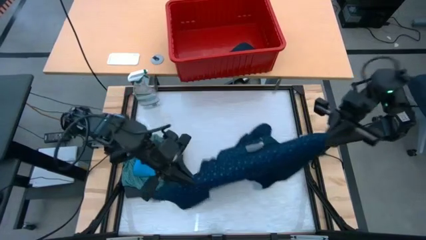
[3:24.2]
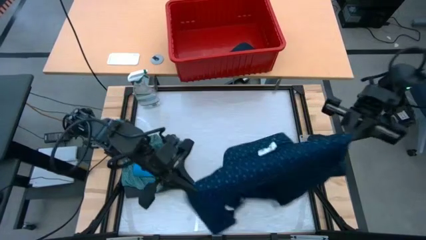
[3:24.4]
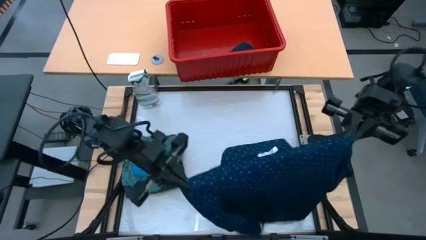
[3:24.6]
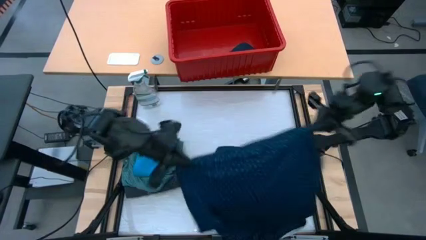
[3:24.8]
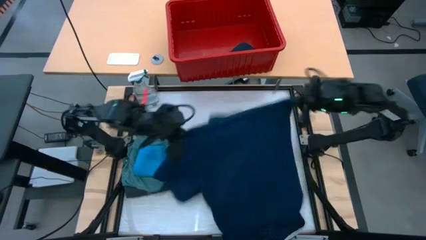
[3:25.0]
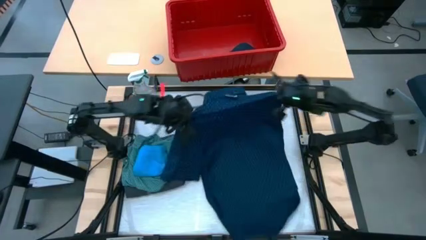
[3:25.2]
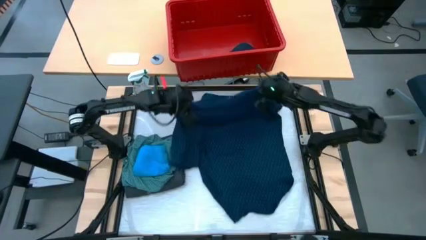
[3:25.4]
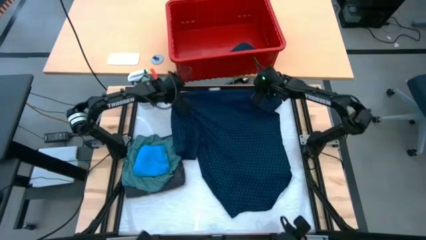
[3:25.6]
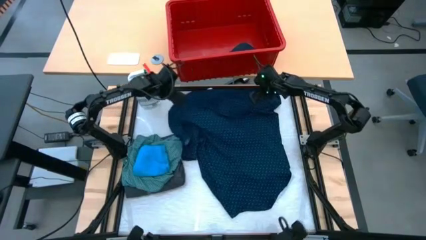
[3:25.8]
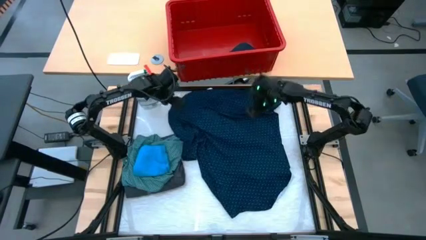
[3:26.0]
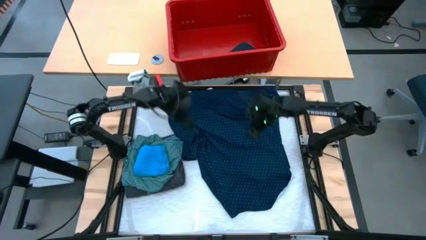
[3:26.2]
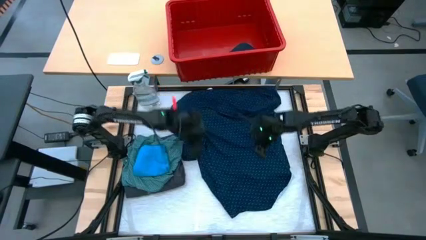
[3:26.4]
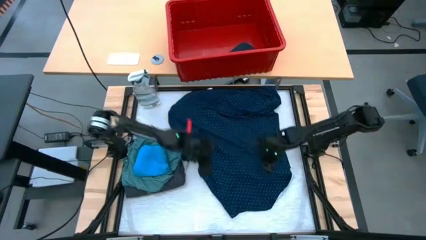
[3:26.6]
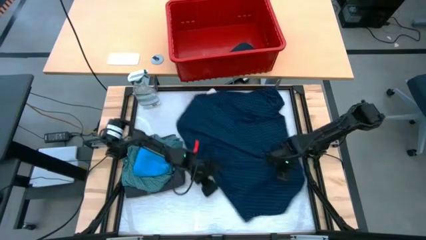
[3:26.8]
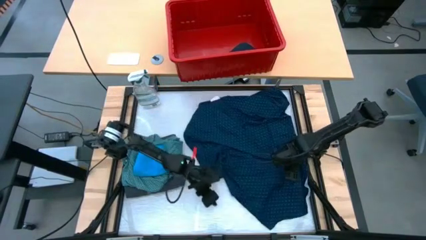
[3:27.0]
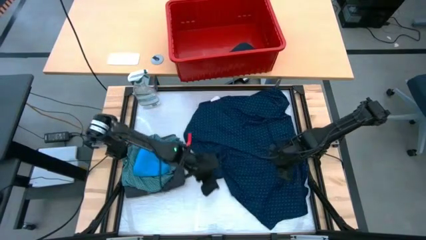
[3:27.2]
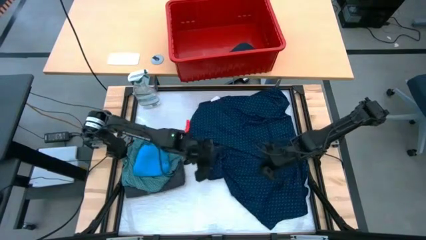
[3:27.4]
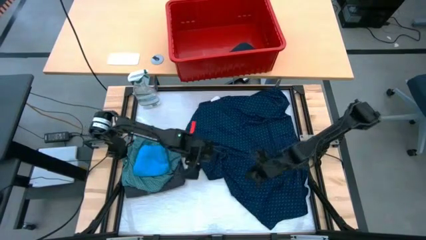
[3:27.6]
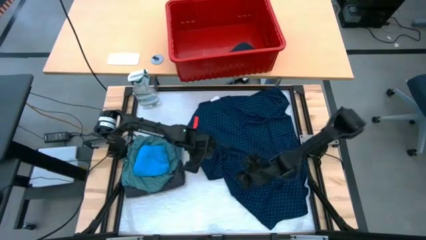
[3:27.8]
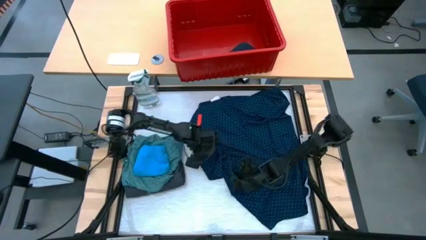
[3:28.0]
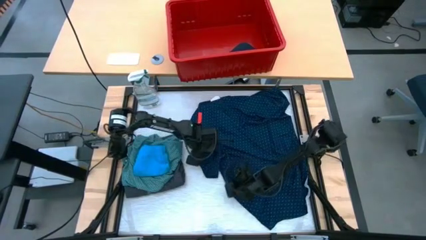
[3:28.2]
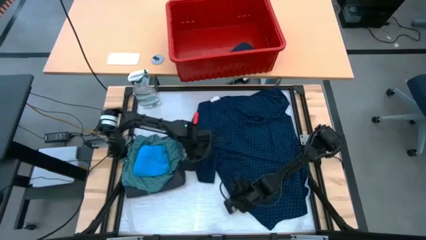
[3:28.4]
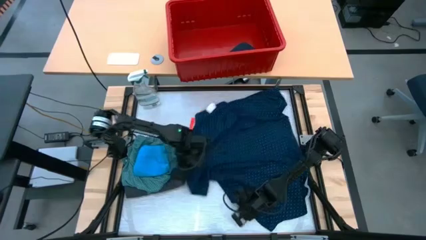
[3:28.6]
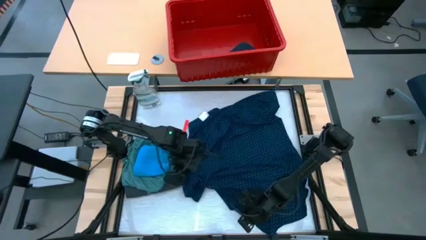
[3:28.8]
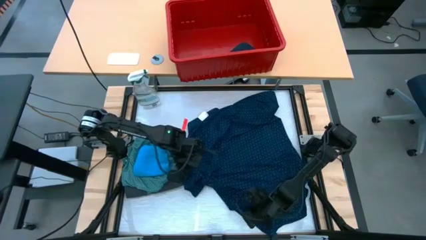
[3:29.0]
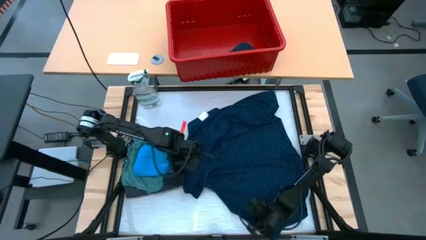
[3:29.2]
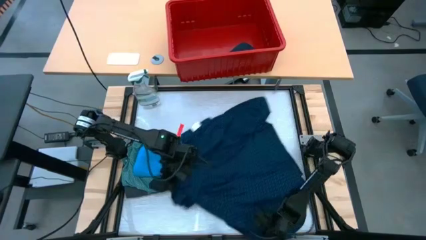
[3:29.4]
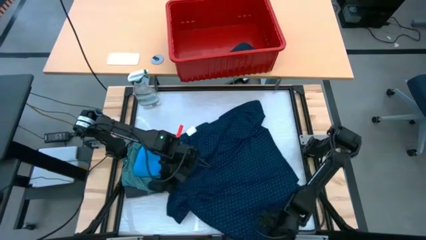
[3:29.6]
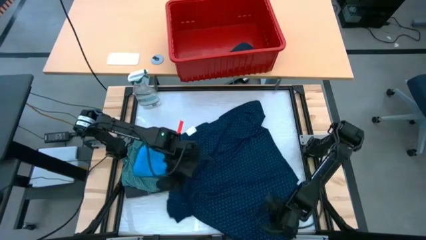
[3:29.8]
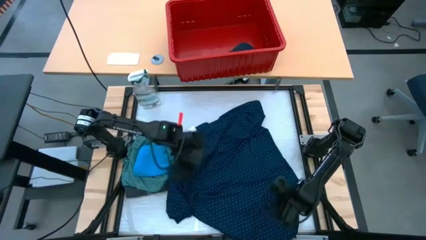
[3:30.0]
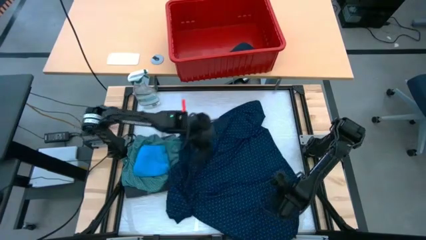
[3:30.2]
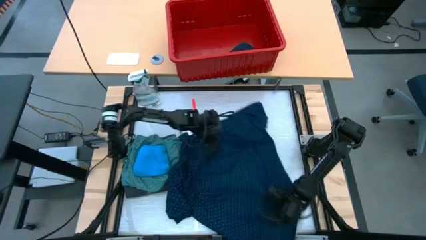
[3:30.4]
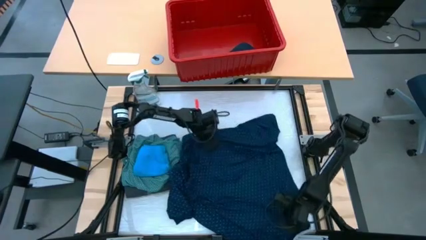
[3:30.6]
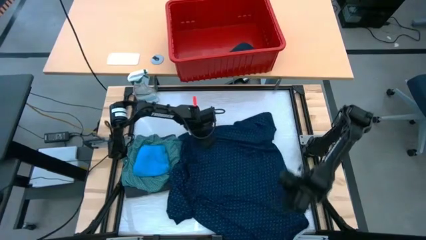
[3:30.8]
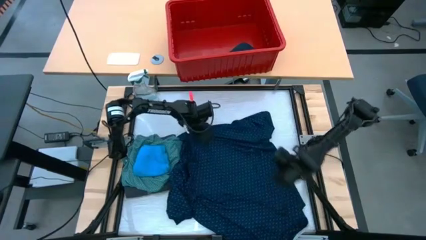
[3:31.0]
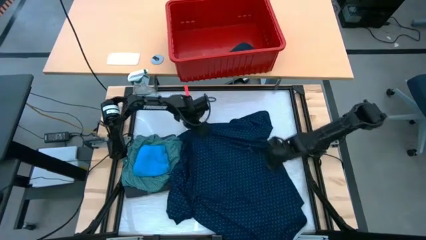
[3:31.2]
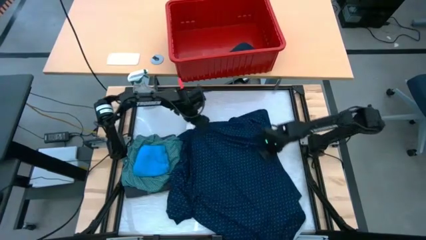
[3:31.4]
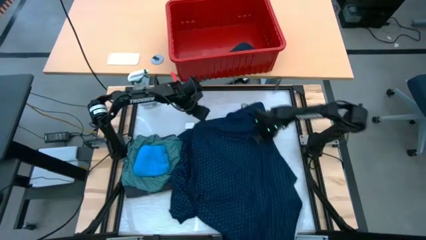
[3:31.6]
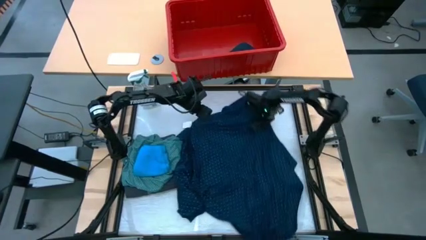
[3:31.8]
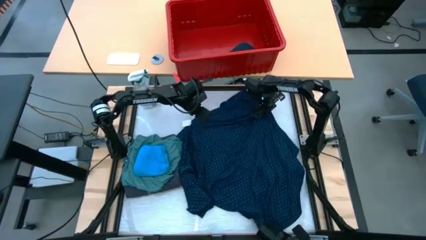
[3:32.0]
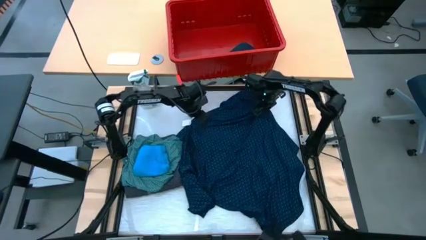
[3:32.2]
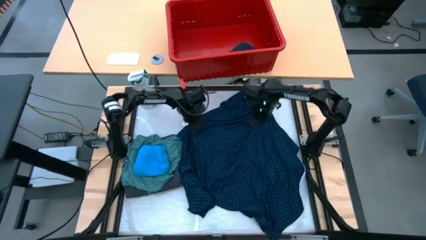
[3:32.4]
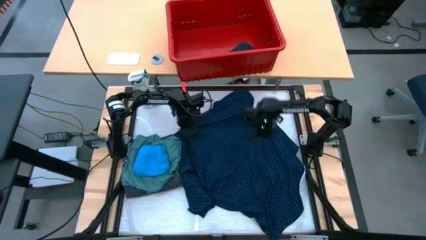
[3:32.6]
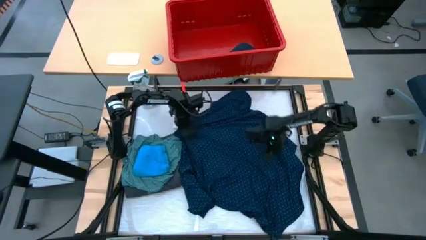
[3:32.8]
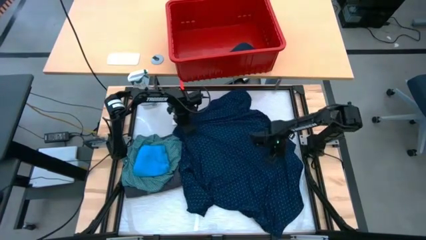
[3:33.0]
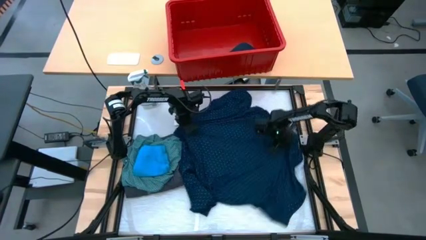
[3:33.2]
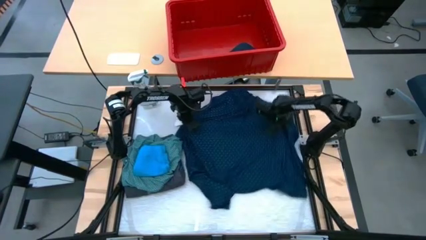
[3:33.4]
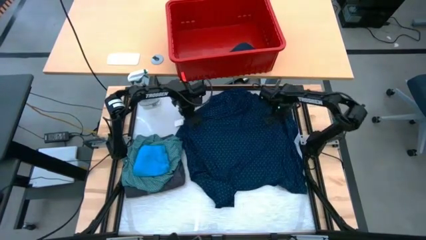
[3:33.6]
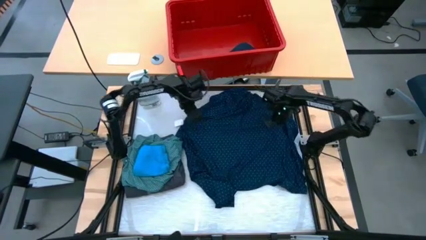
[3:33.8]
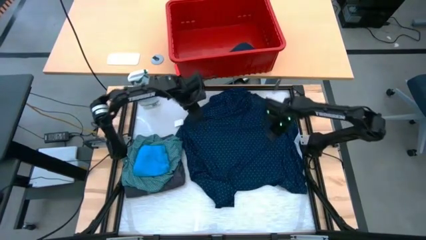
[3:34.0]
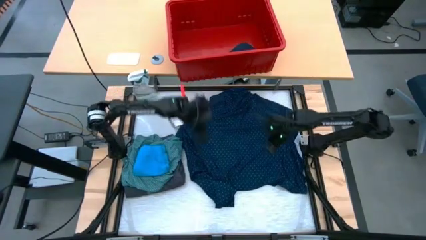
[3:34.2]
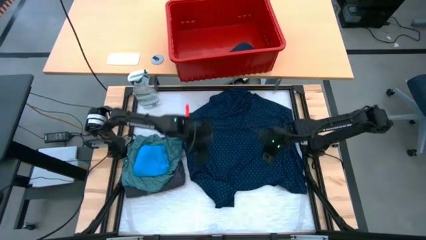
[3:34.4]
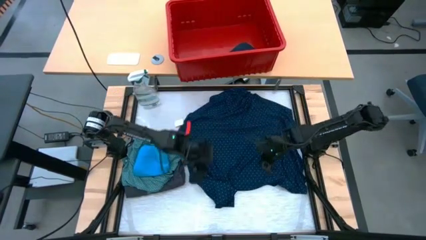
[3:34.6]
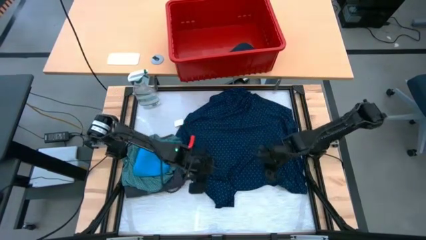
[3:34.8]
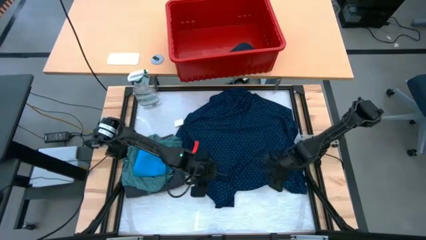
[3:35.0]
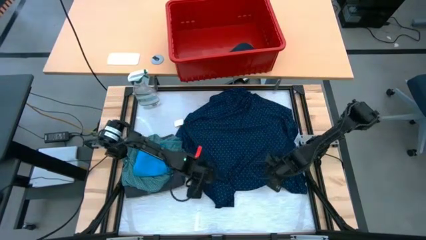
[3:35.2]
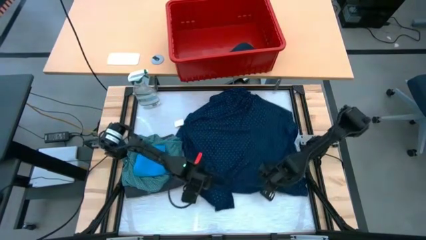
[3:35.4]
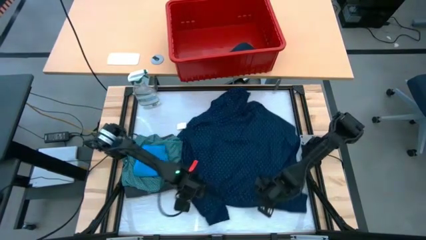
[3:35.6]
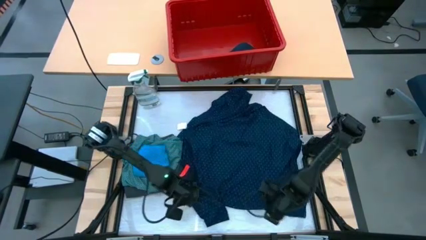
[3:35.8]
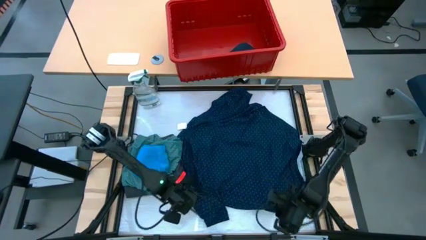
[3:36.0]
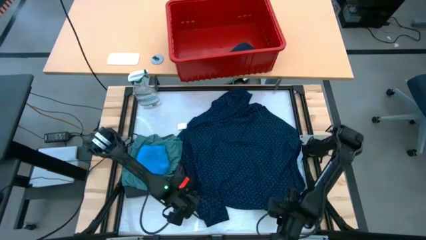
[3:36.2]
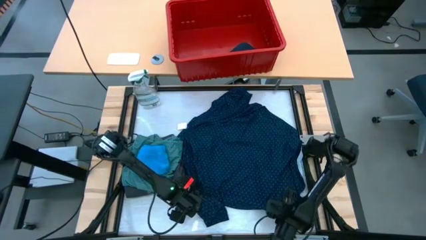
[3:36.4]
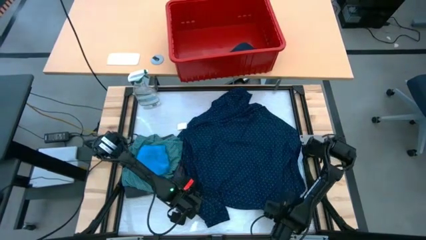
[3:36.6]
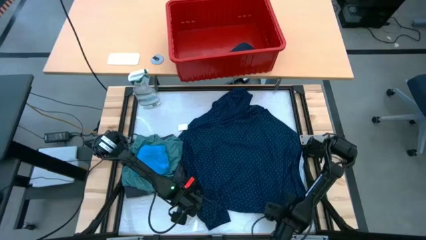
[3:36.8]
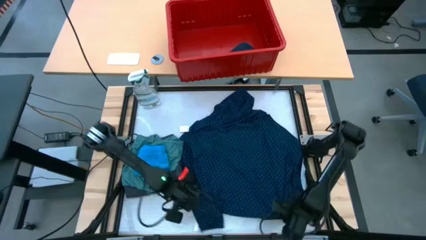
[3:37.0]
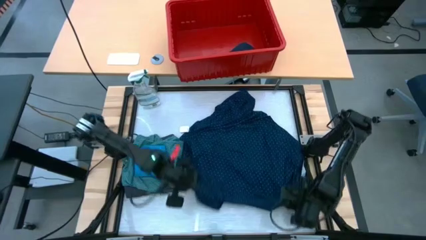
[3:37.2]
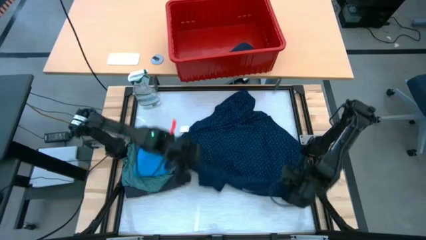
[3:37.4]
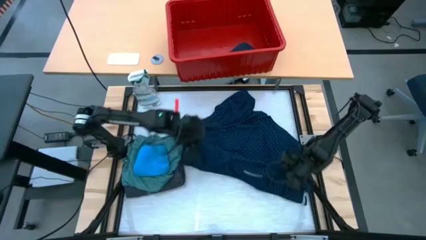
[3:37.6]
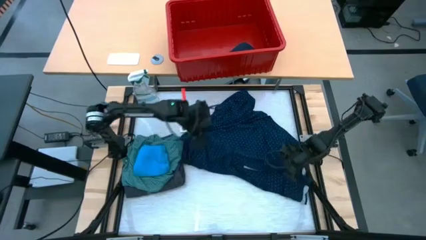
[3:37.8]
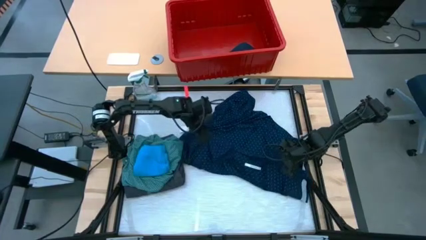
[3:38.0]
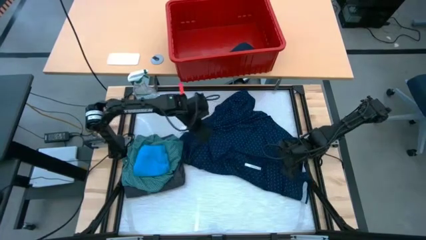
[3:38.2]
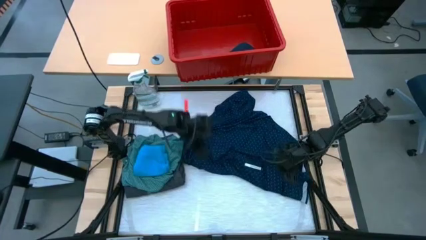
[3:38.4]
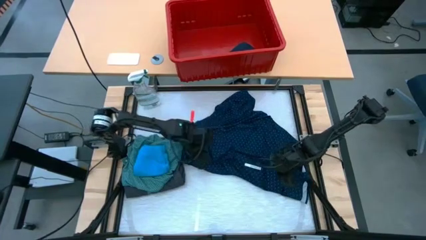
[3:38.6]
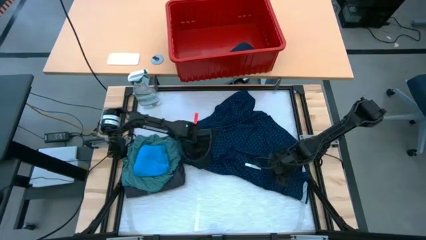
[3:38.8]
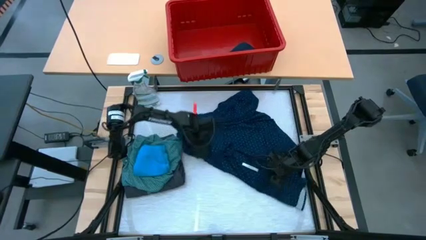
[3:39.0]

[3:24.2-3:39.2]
Task: Fold laundry
Fold the blue shirt
